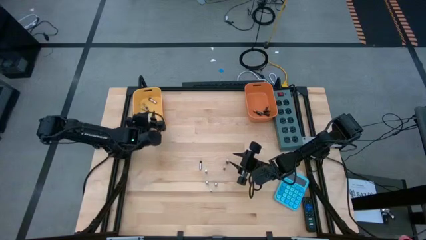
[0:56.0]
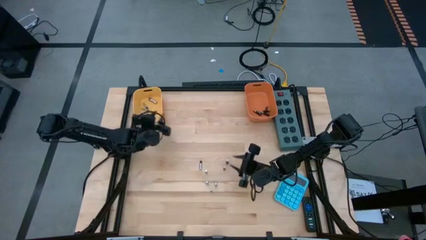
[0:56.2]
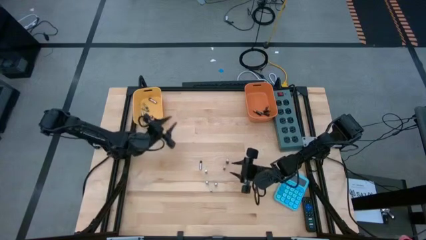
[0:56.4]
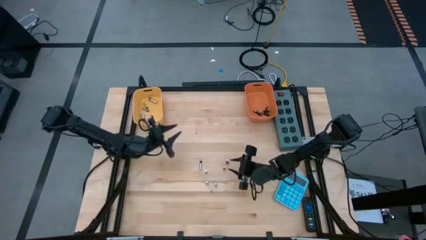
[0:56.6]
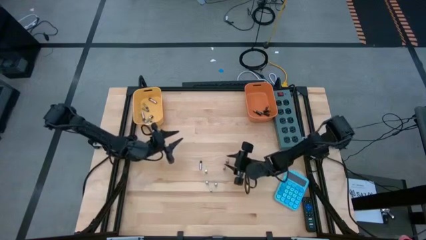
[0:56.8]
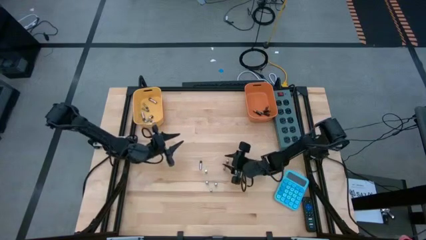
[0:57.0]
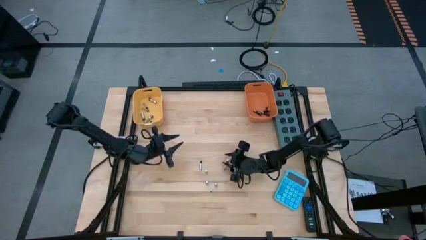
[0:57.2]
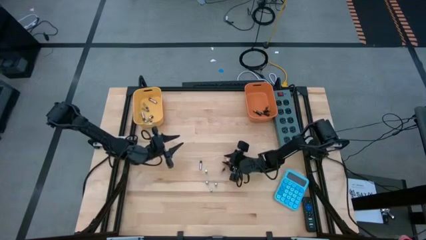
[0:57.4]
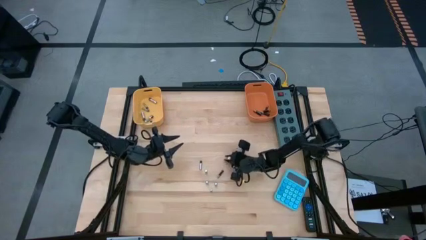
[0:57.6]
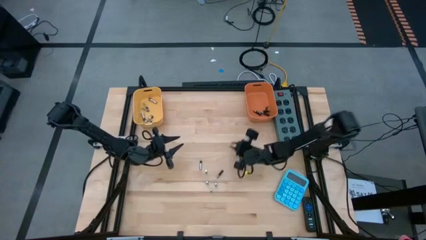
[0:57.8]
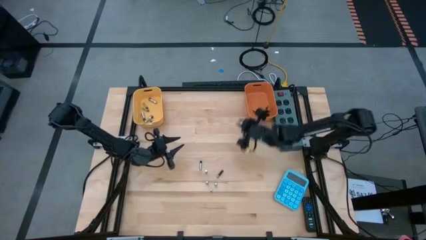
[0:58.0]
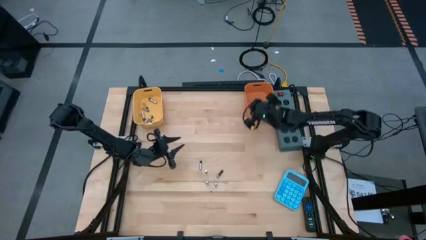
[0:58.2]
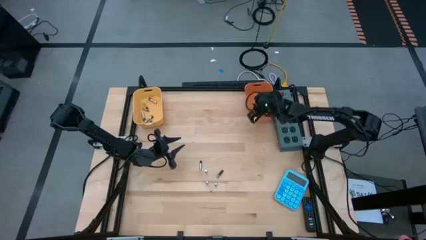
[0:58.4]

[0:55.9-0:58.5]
Task: Sort batteries
Put the black battery into the orange bin

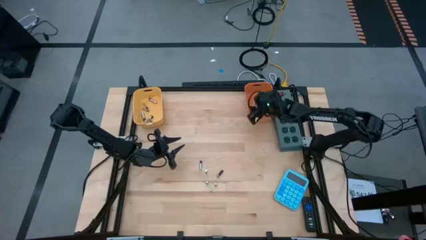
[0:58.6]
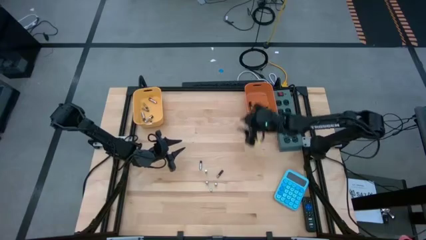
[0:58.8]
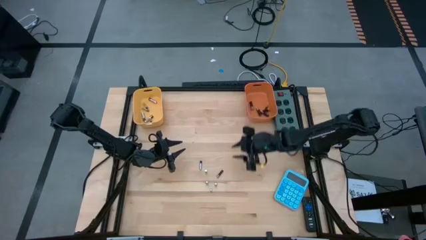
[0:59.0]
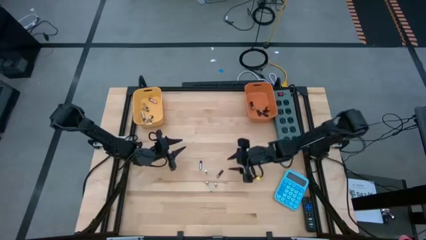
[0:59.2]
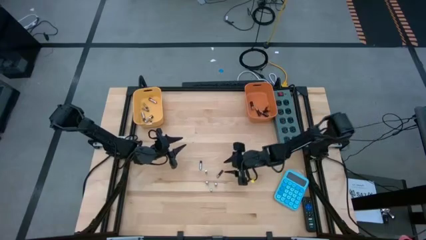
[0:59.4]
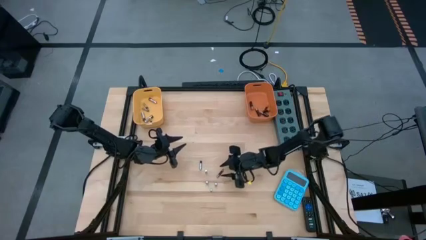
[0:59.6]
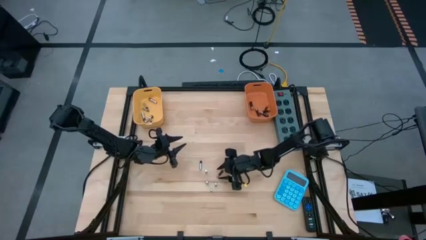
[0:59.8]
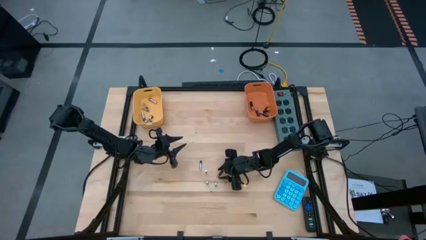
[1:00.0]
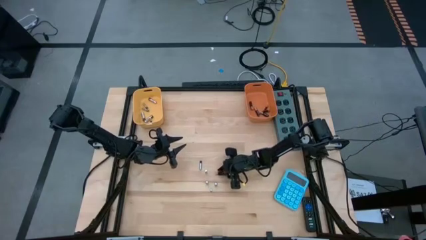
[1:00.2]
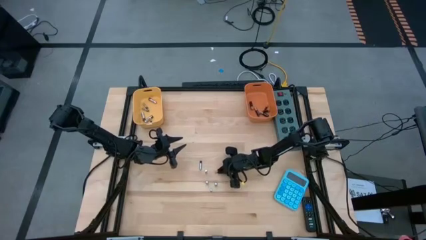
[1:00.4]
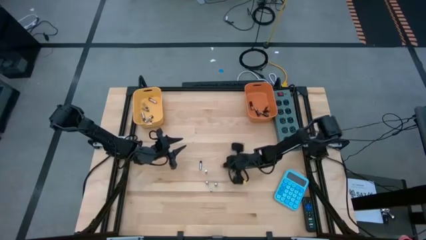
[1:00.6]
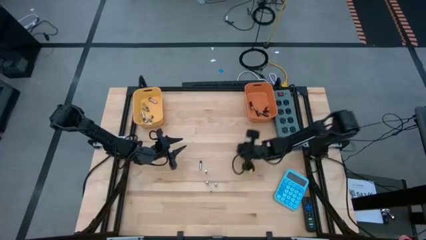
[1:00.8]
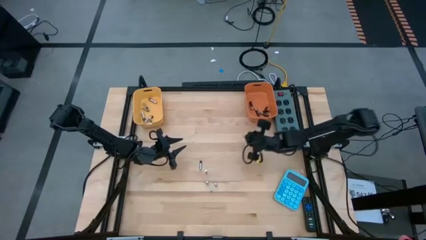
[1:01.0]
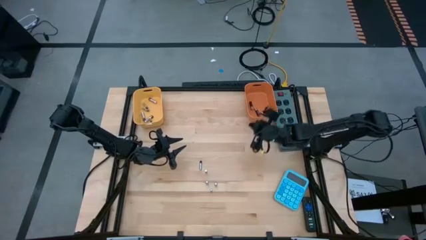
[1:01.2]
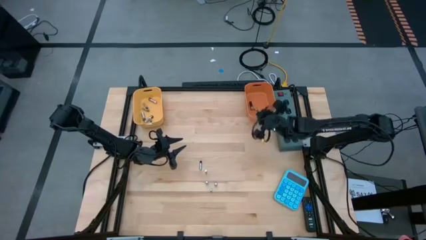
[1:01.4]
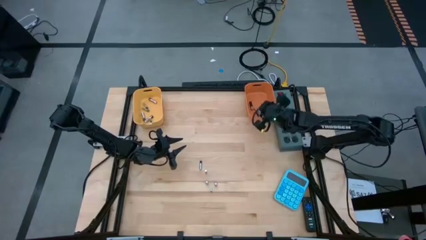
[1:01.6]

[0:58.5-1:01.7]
Put the black battery into the orange bin

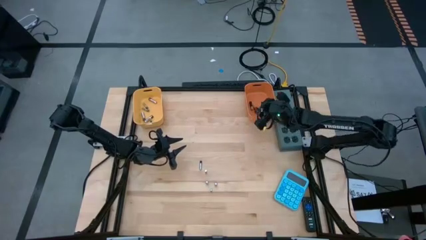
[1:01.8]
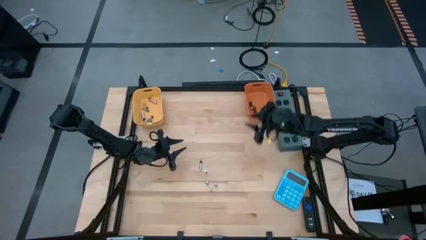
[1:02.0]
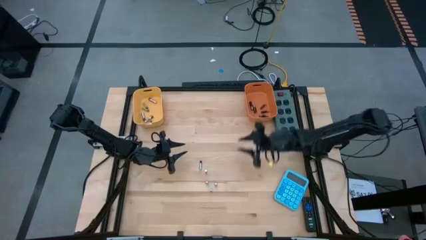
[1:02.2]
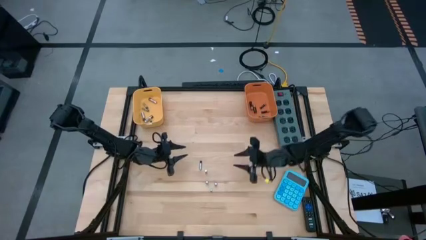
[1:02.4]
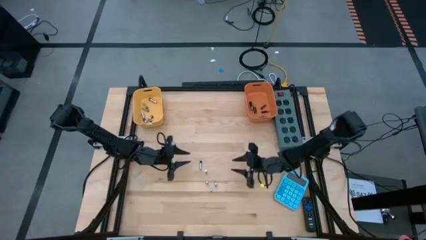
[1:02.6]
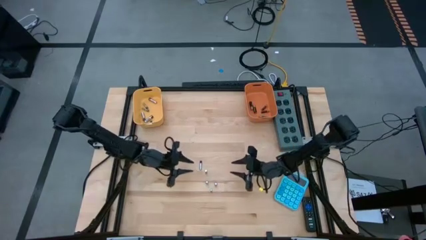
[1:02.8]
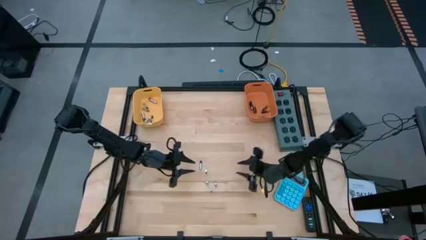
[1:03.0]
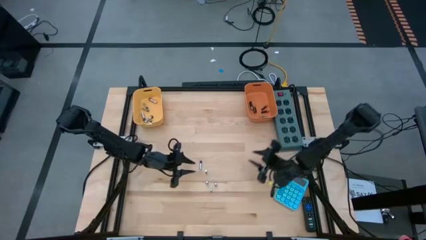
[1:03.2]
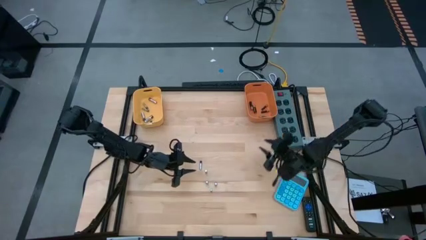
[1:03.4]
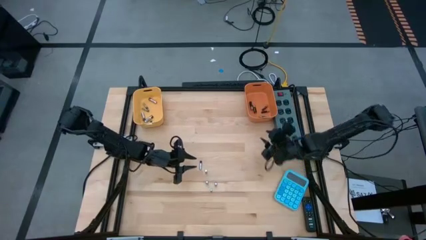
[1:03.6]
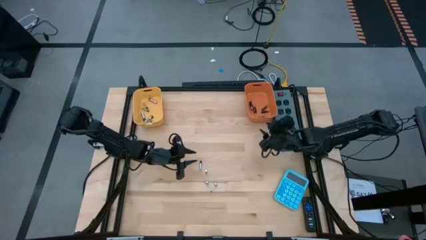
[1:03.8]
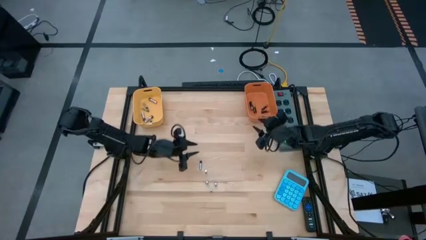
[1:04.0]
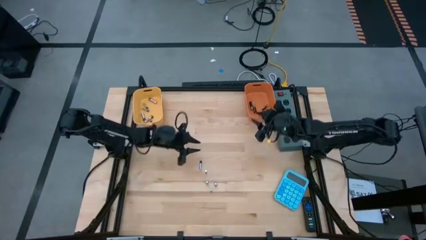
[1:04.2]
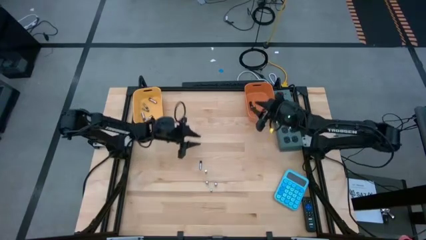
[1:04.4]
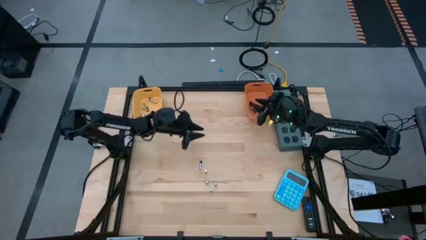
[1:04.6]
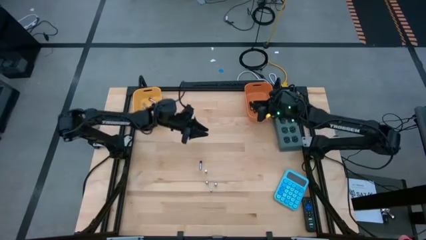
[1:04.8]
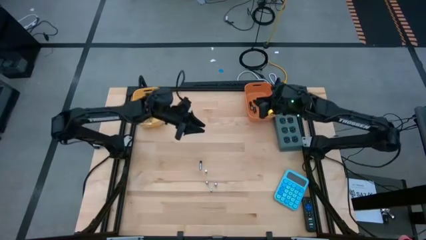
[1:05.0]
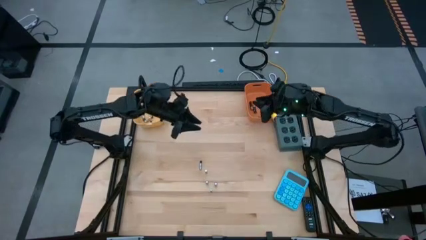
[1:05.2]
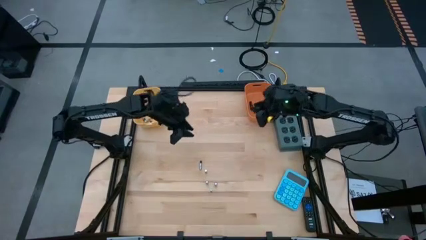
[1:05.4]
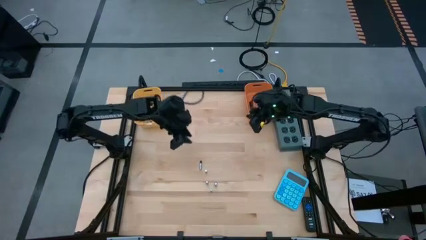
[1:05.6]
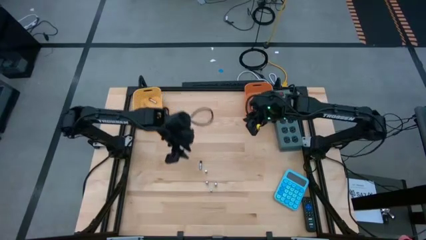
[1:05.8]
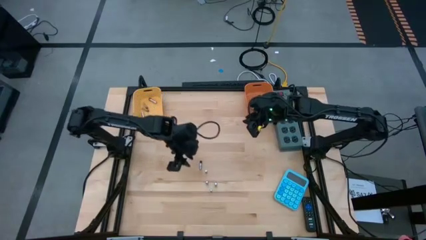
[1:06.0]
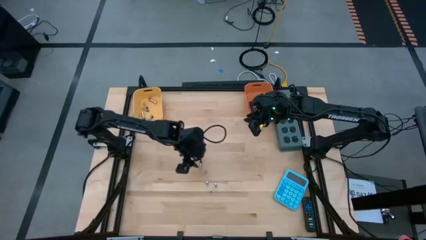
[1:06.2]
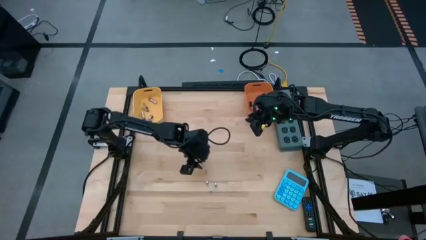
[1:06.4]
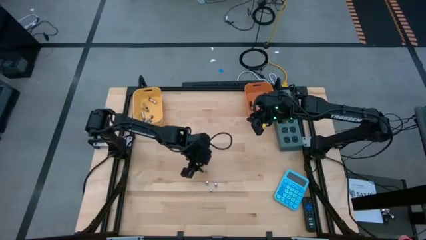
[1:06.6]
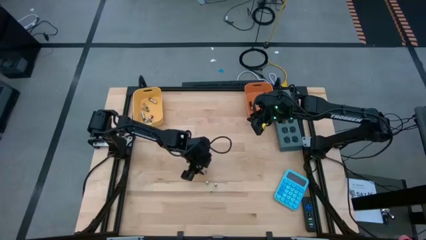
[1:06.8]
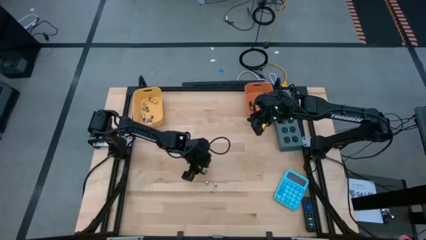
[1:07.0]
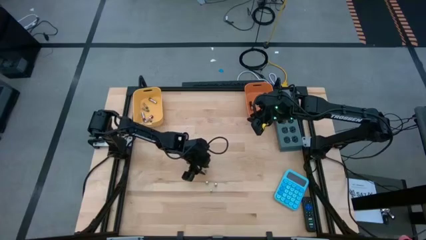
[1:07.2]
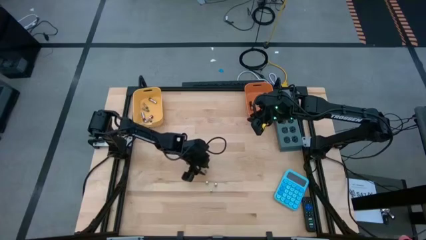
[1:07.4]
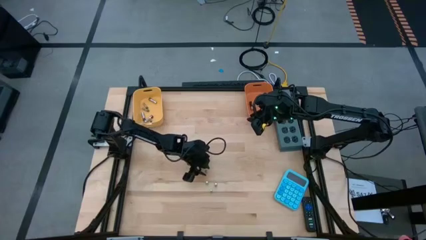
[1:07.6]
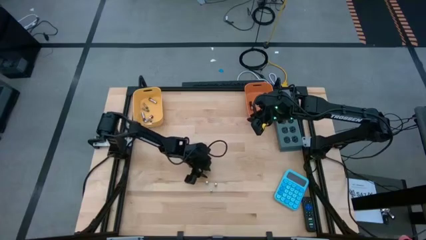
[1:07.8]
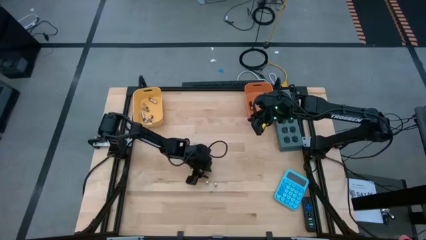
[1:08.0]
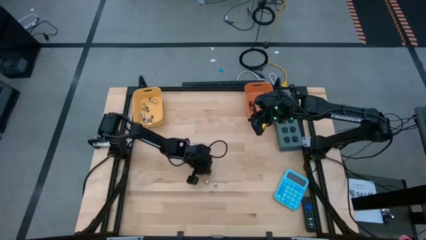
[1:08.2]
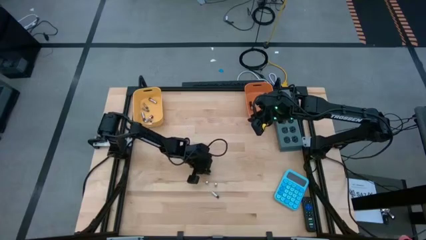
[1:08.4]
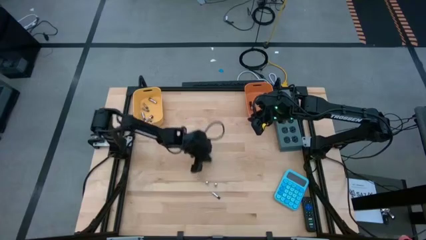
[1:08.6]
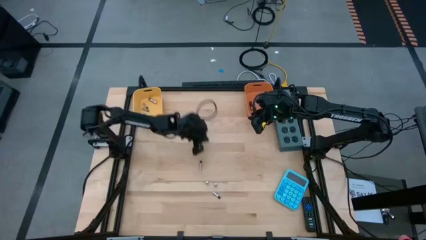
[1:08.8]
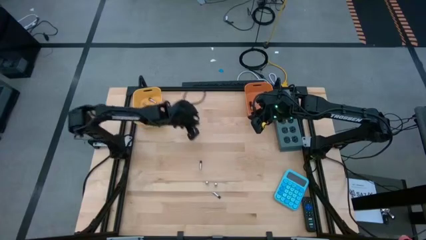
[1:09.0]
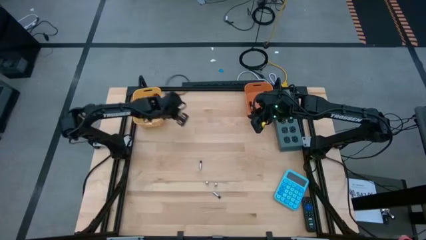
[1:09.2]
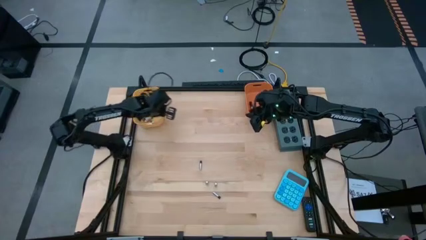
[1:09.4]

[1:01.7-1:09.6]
Put the silver battery into the yellow bin

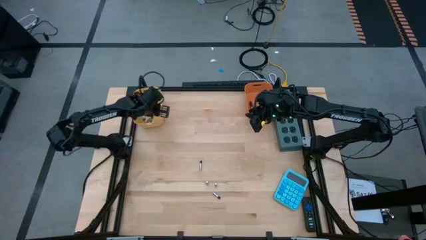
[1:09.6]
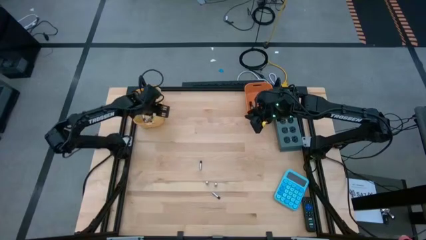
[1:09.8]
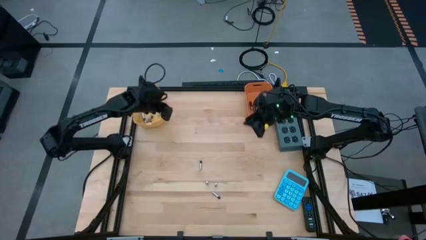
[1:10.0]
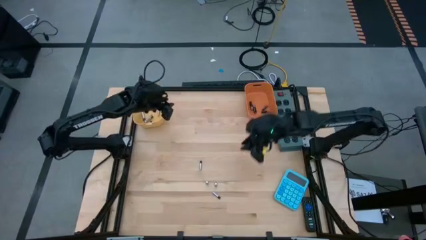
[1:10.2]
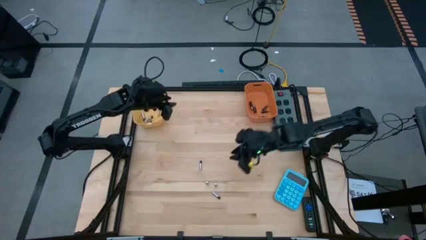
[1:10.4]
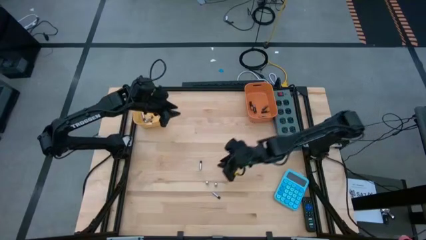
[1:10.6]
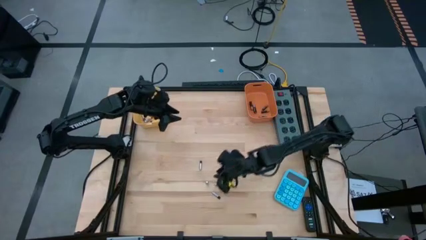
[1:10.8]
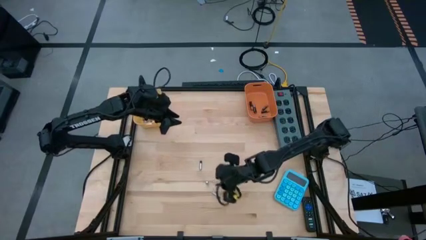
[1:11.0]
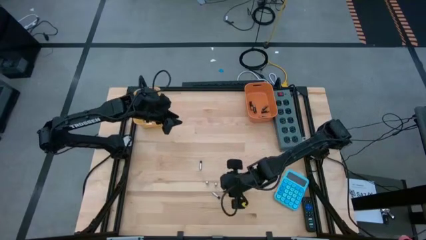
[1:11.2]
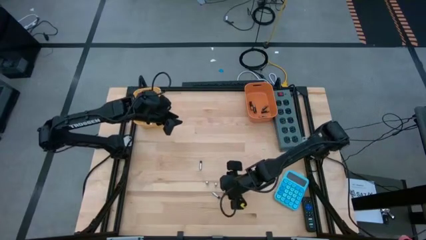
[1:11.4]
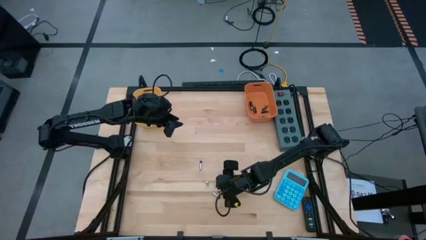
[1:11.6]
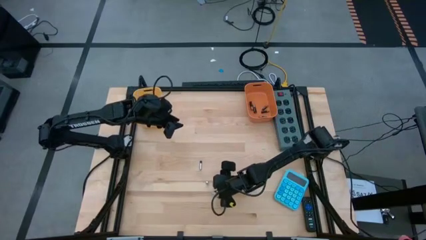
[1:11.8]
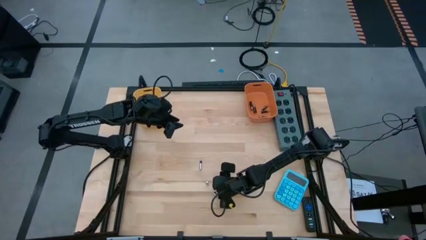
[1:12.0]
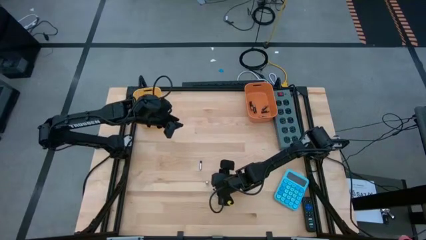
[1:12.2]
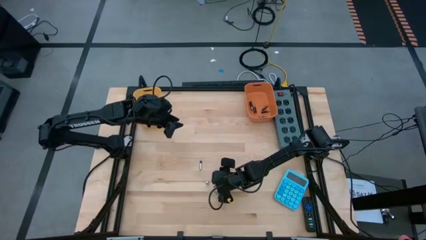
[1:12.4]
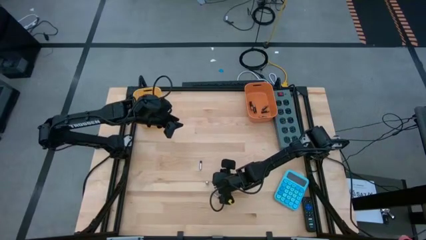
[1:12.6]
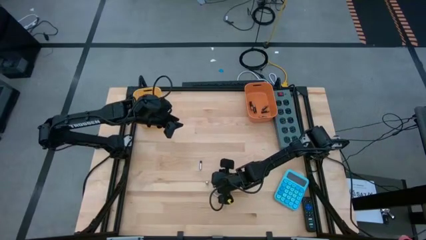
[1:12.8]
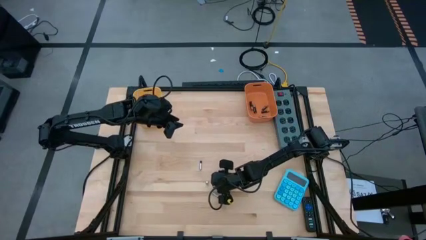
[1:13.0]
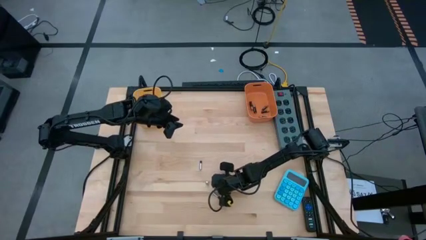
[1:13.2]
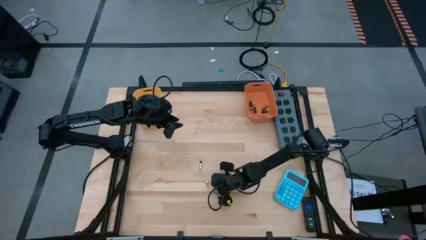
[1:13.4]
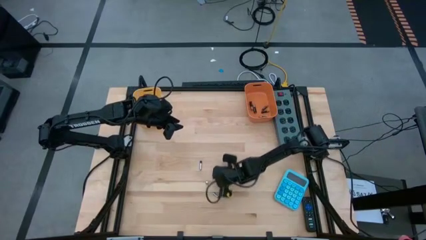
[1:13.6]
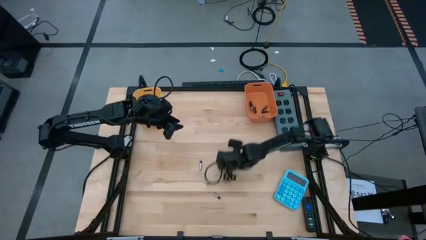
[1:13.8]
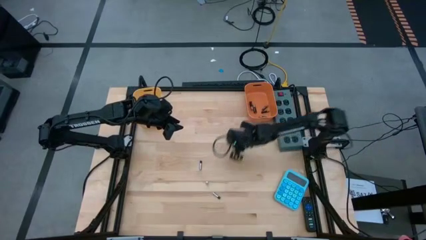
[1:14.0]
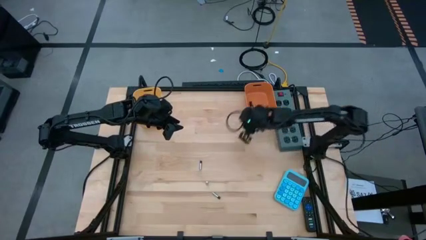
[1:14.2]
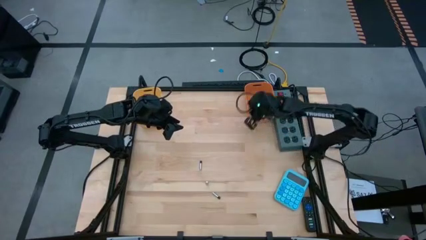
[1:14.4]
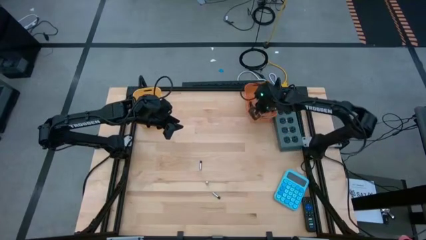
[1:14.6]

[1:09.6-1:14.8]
Put the silver battery into the yellow bin
